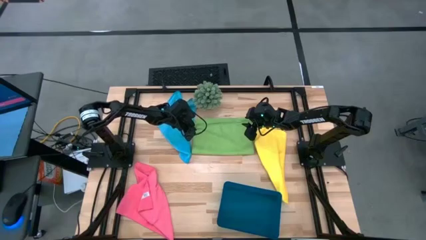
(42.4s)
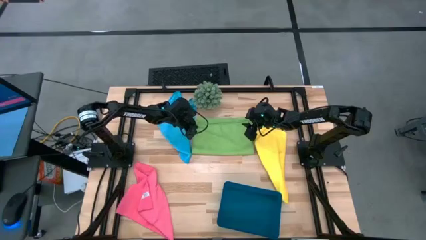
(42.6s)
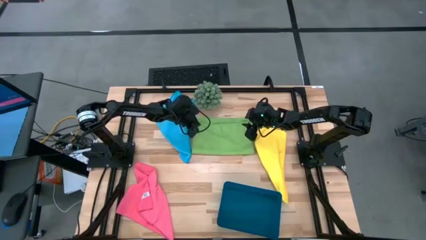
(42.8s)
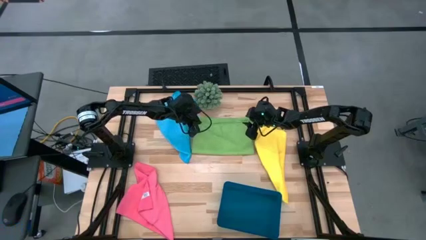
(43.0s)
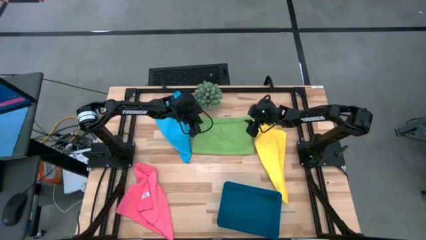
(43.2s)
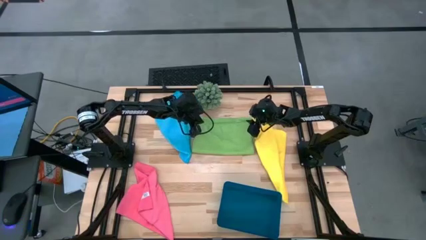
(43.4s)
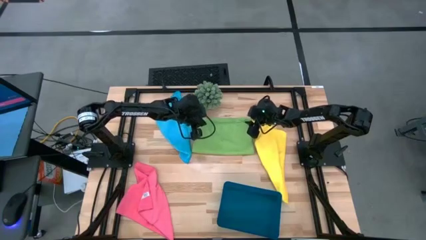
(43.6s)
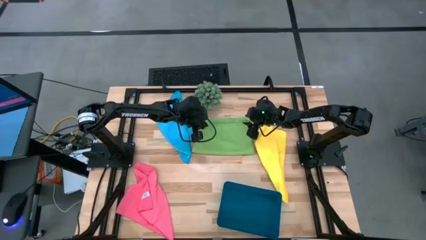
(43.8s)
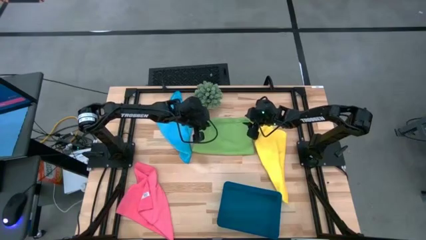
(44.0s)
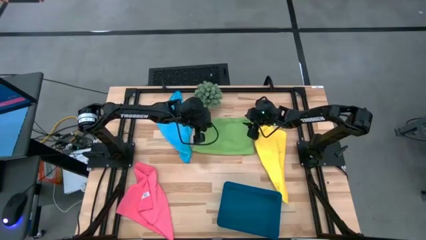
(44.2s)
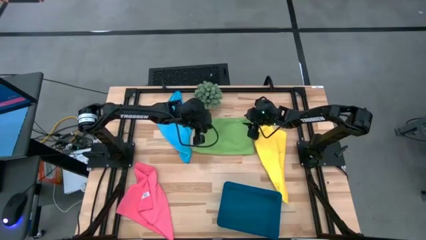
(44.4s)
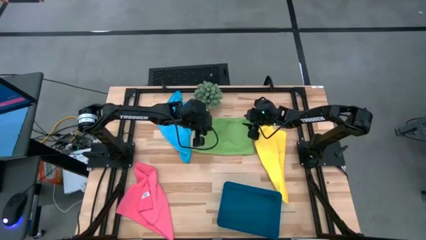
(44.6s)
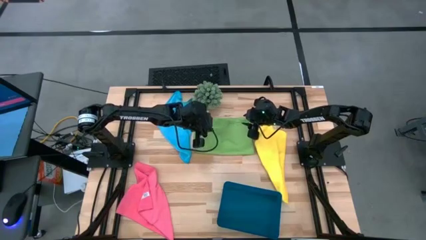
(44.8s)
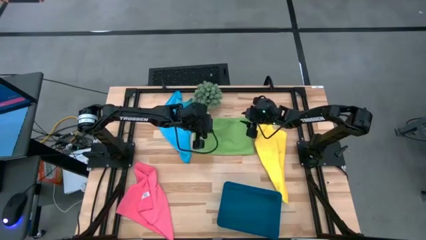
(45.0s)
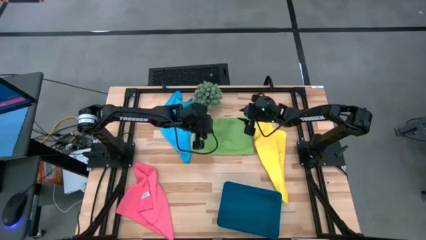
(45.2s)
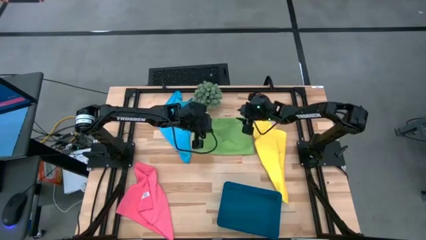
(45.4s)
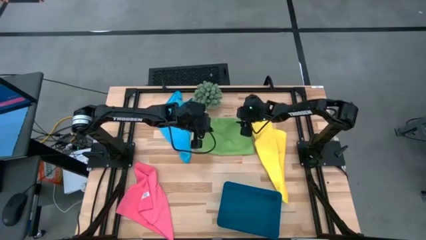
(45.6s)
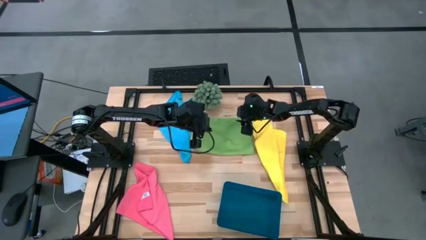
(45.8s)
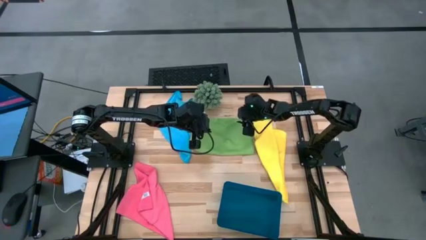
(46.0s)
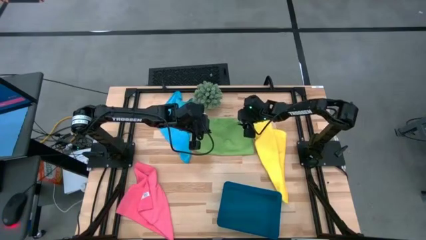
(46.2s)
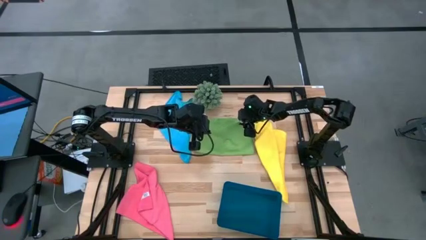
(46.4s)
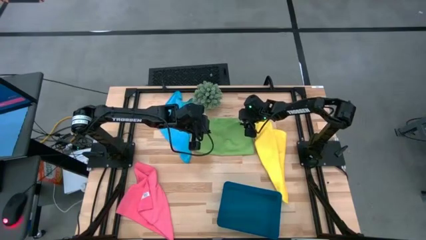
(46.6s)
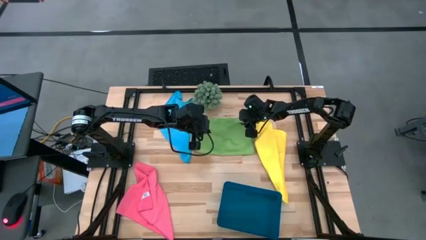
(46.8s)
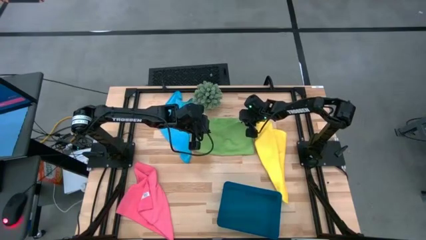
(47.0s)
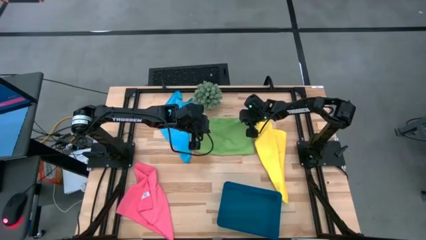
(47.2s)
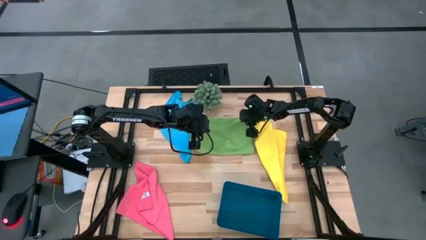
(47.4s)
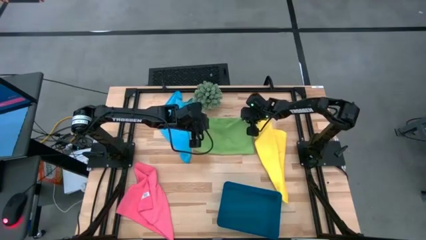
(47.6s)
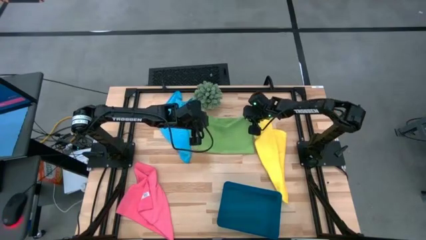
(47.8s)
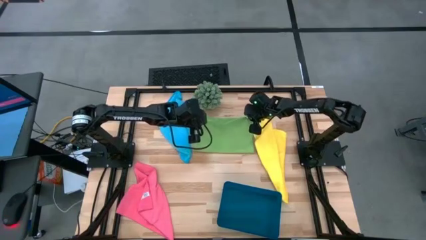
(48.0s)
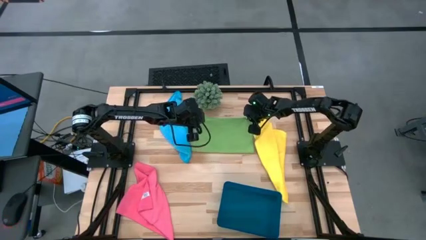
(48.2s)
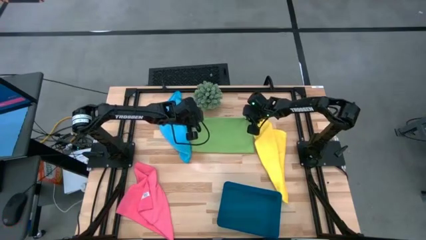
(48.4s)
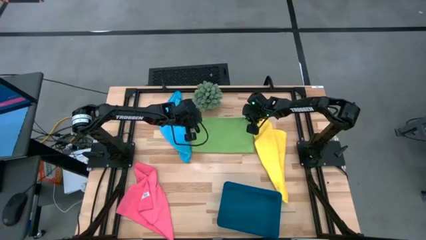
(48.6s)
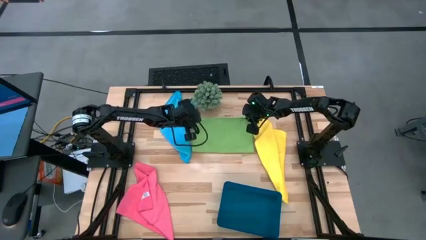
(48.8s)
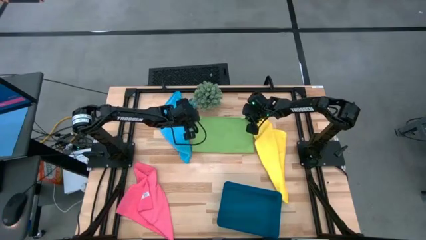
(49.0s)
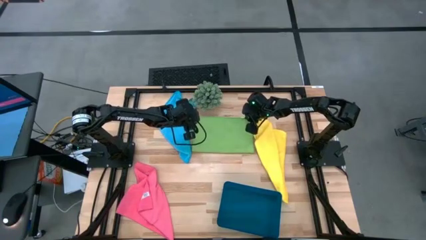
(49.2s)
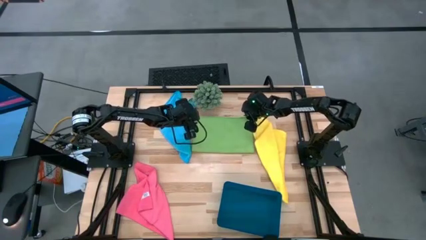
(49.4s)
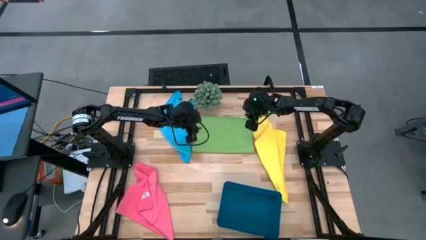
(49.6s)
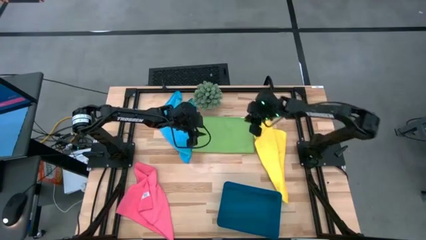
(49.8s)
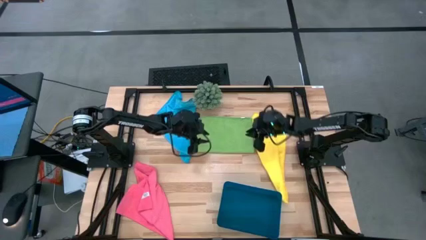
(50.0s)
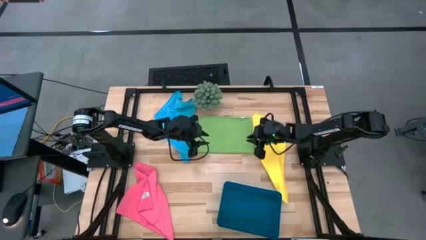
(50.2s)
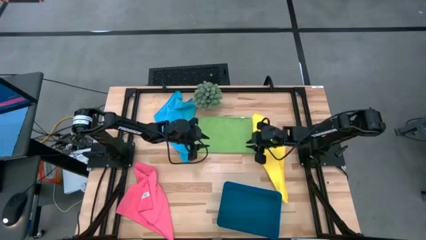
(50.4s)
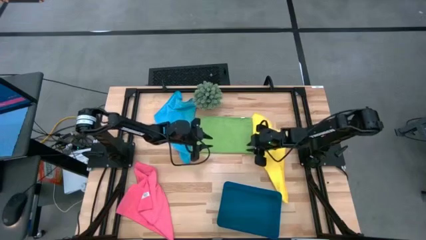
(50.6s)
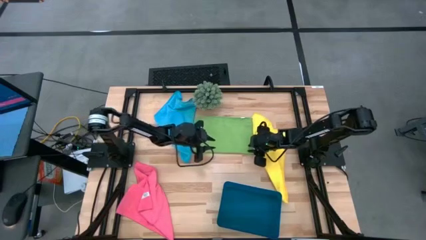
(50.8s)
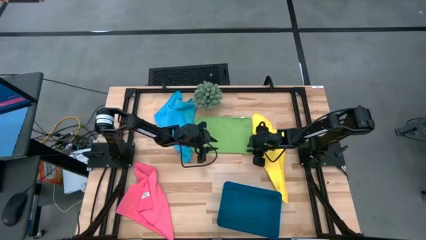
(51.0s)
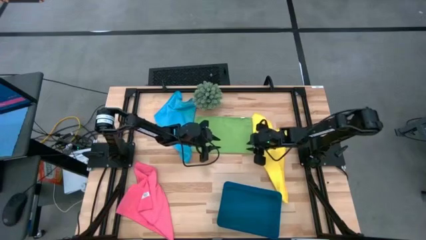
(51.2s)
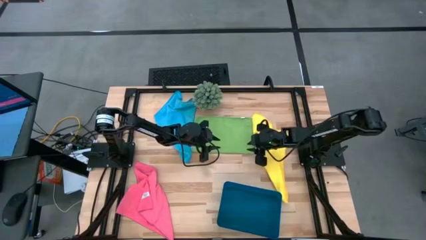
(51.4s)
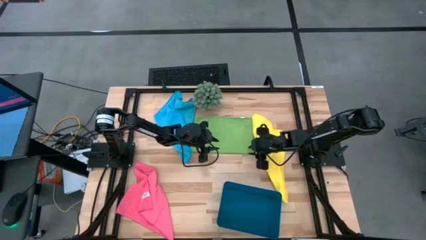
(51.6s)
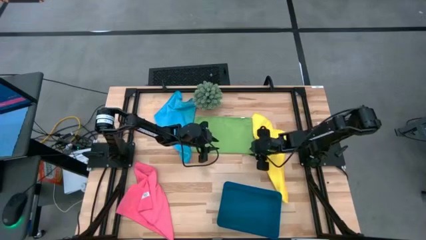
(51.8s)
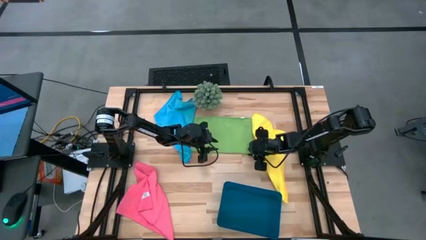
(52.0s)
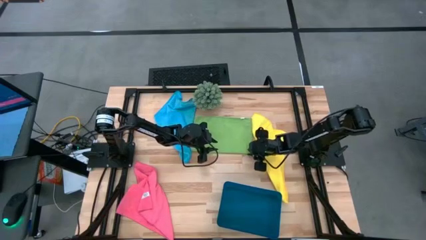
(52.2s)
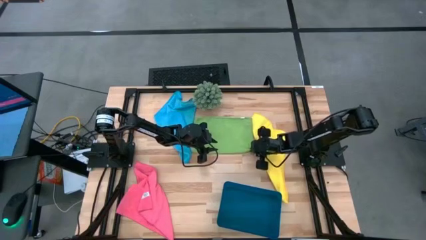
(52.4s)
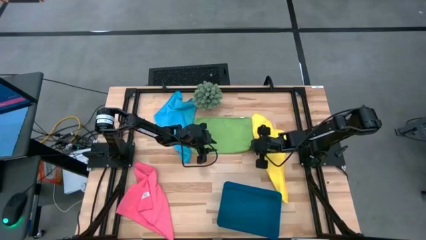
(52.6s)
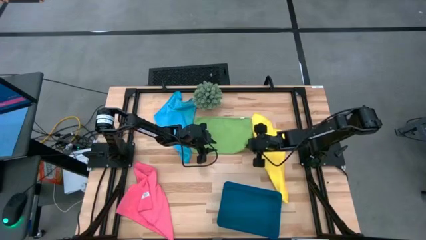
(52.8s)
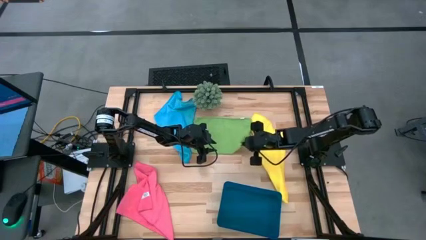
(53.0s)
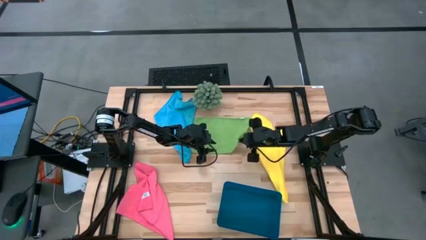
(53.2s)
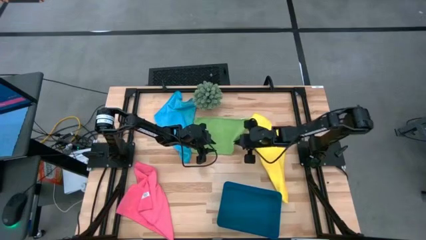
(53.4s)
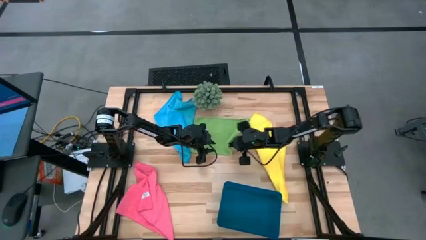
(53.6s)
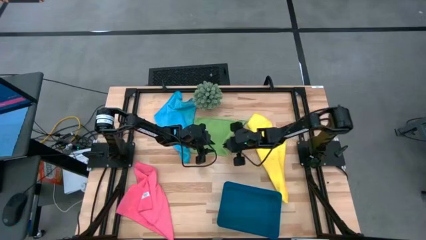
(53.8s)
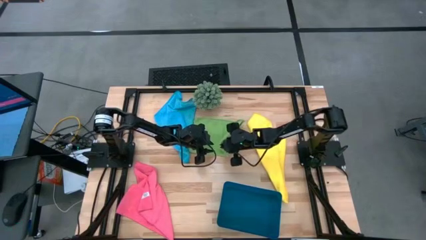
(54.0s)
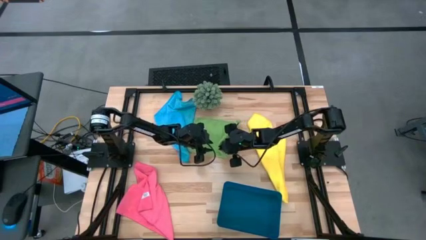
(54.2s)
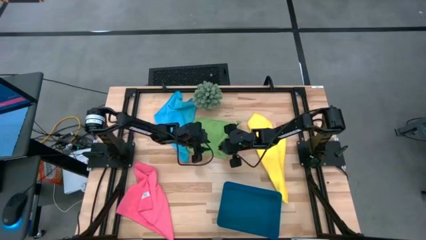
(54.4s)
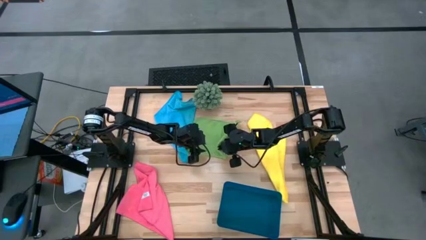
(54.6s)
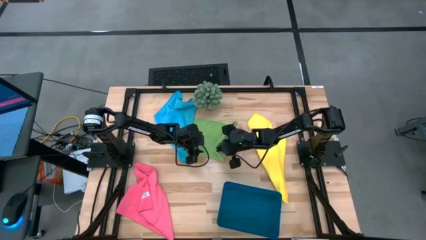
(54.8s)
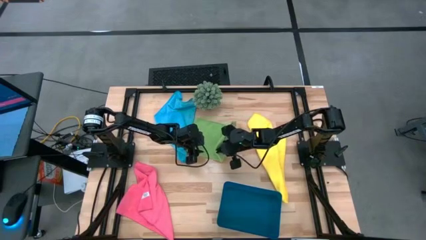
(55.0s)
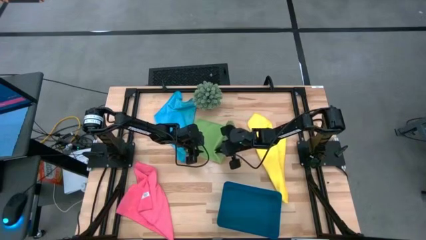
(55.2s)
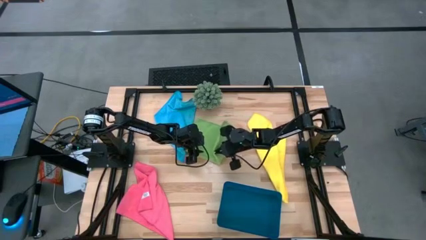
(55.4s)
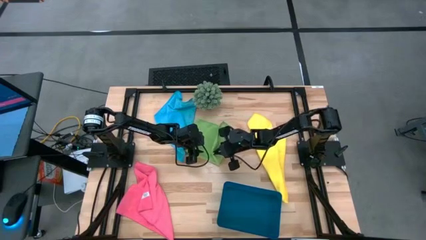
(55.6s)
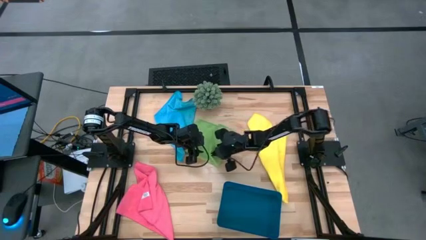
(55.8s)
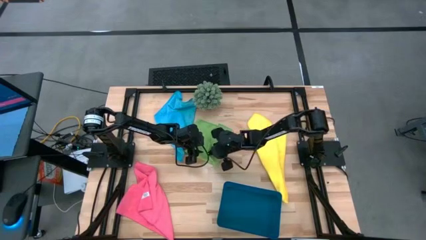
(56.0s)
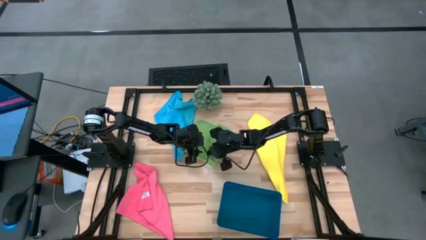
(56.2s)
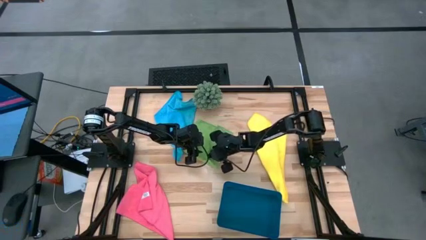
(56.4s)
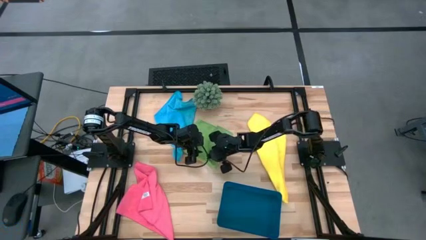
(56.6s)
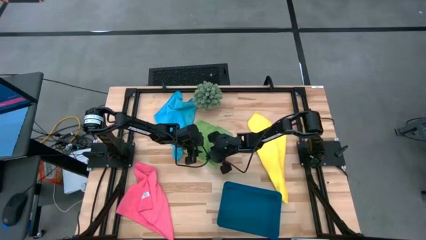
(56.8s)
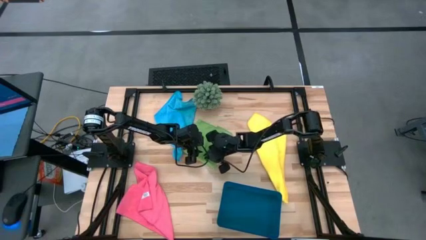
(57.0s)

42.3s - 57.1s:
Task: Fold microfiber towels
Fold the green microfiber cloth

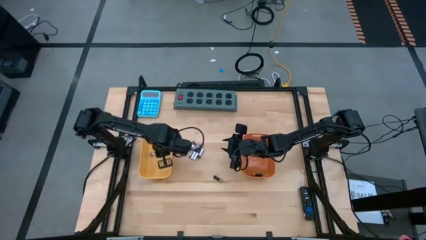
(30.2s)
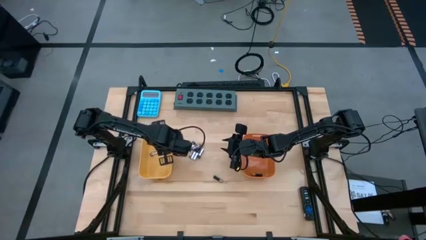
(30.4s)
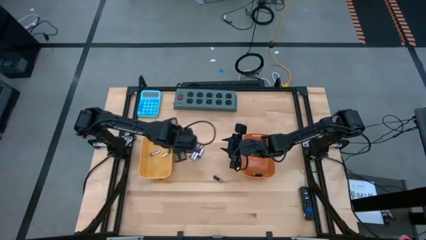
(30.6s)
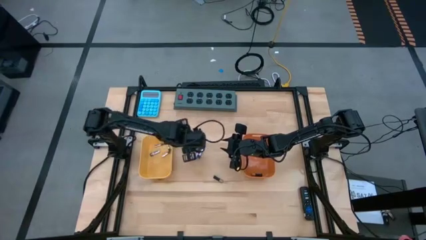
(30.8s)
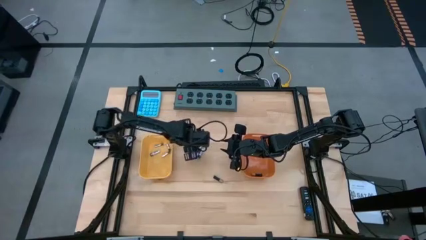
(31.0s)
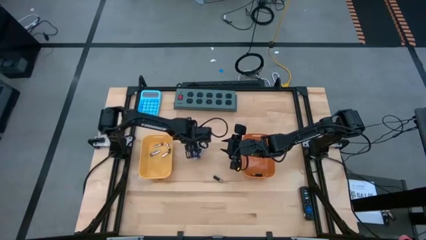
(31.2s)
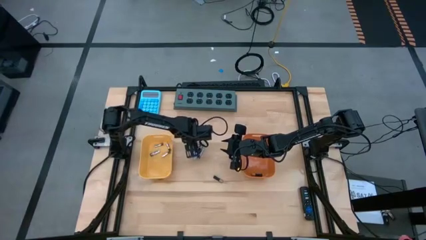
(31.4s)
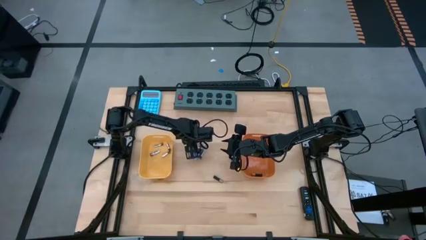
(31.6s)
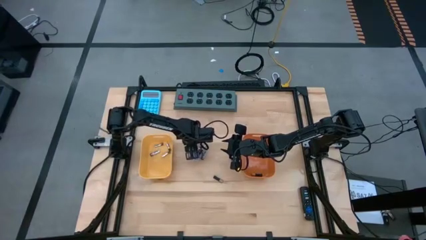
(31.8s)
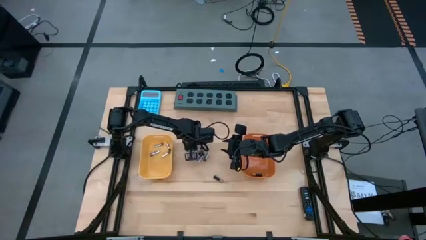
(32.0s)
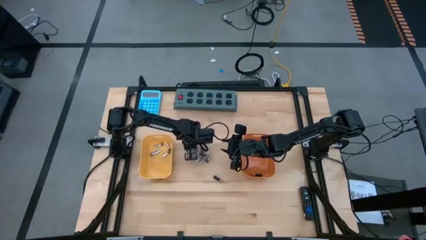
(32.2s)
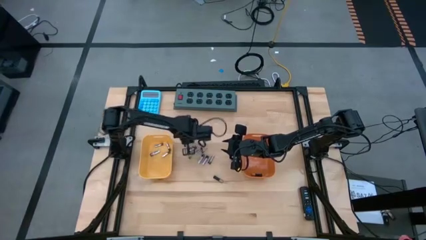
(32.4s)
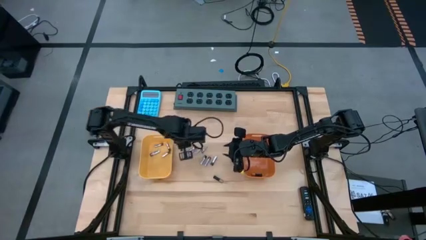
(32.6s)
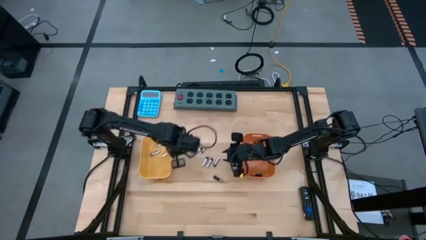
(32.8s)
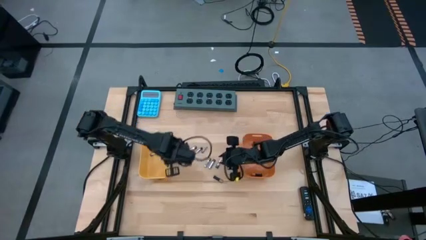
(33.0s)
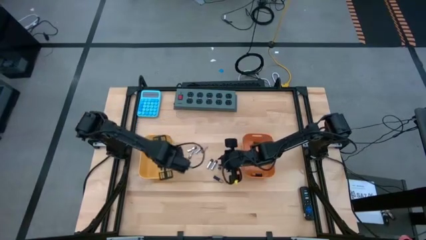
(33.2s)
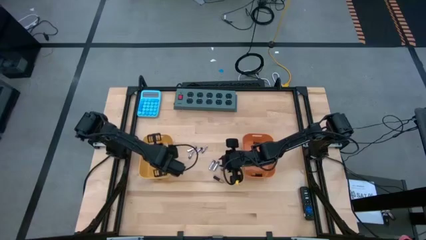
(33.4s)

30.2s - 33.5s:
Task: Sort batteries
Put the silver battery into the yellow bin
